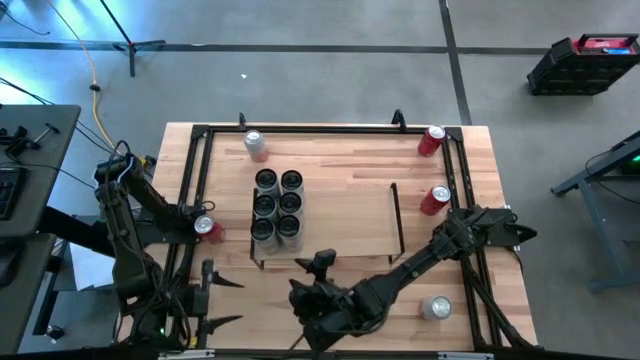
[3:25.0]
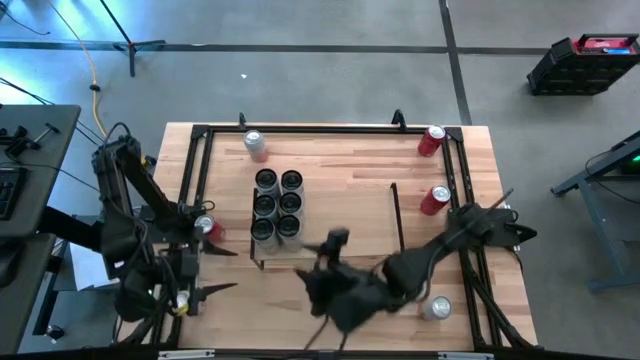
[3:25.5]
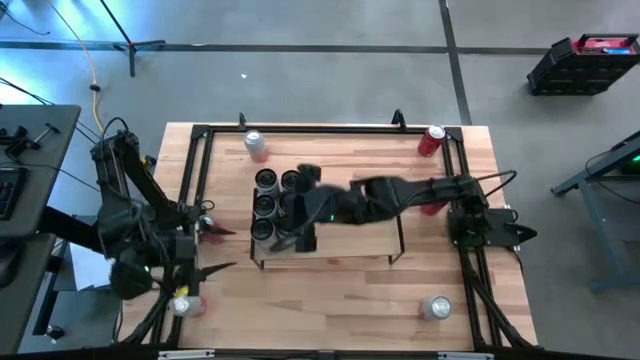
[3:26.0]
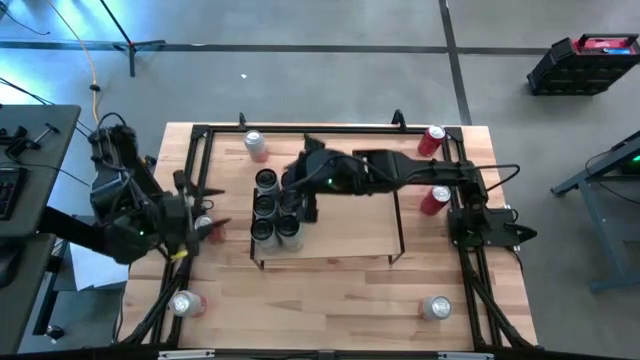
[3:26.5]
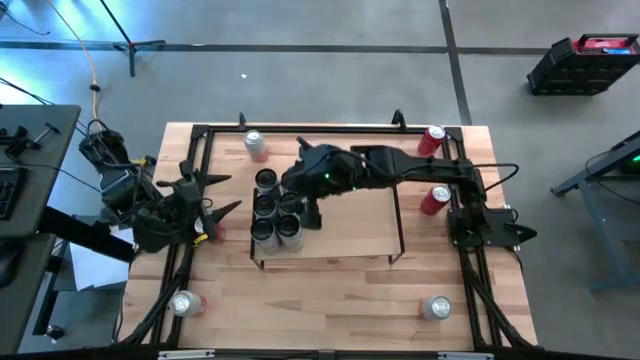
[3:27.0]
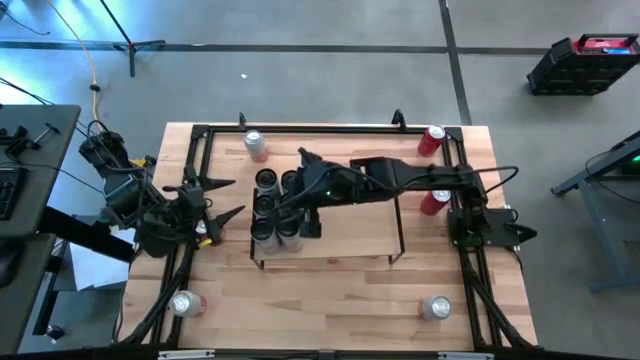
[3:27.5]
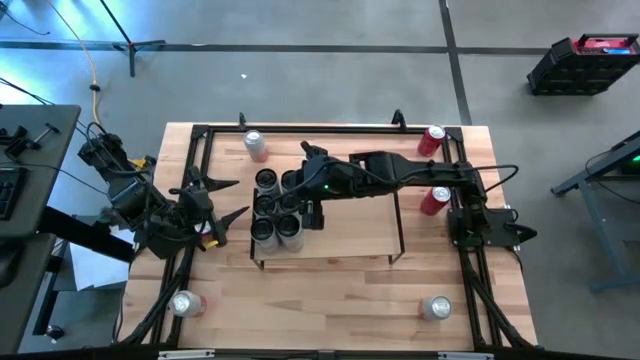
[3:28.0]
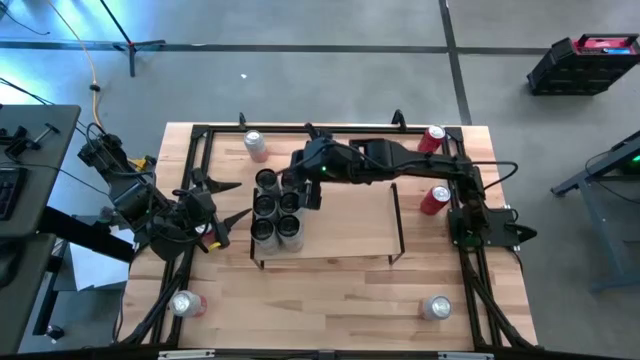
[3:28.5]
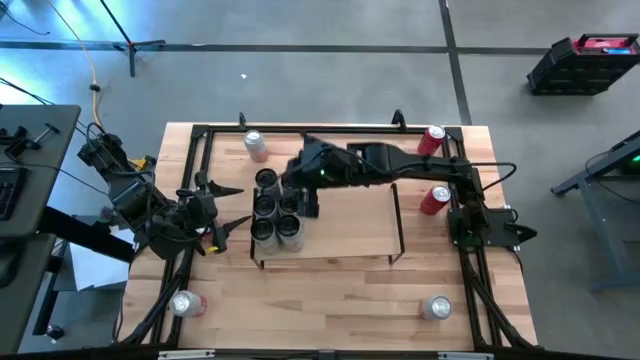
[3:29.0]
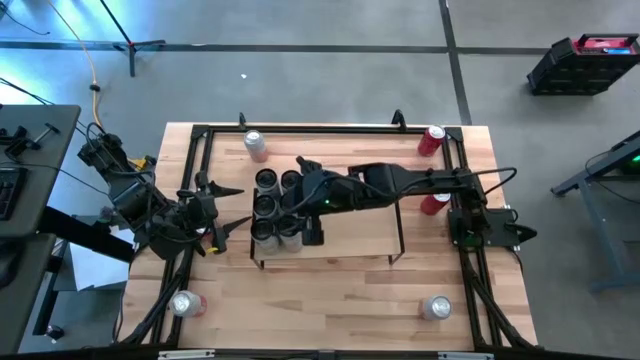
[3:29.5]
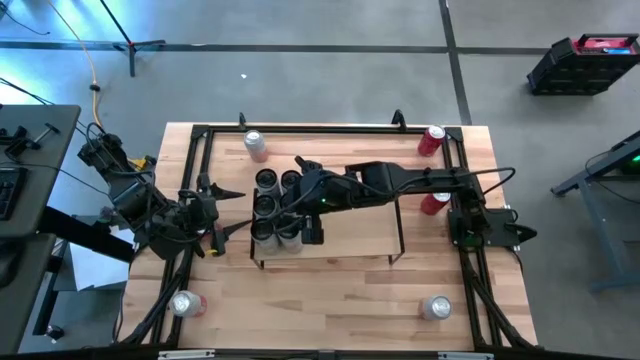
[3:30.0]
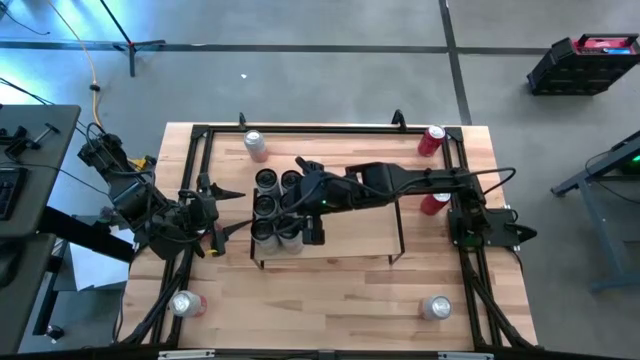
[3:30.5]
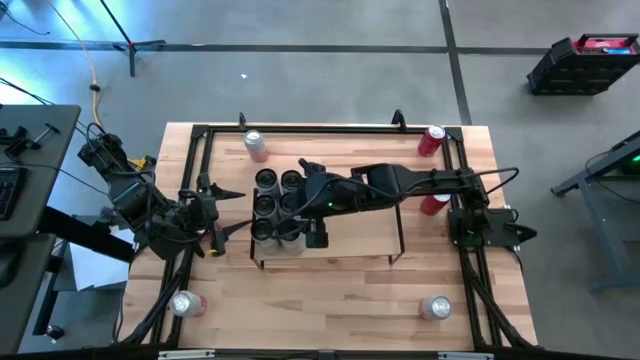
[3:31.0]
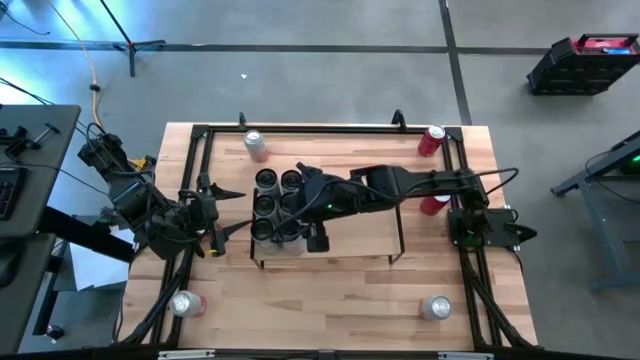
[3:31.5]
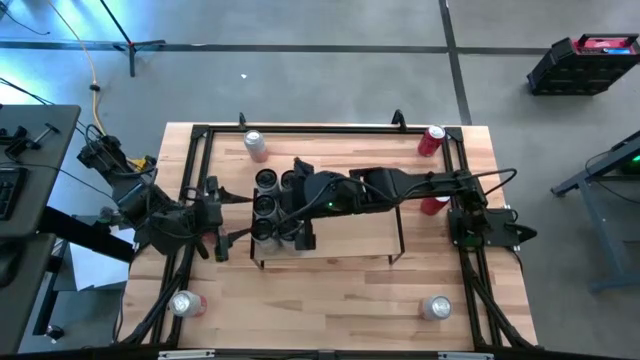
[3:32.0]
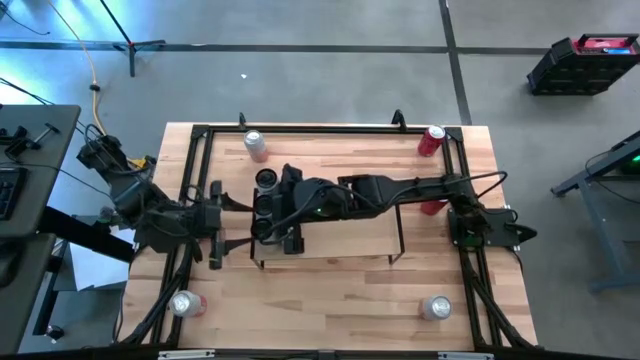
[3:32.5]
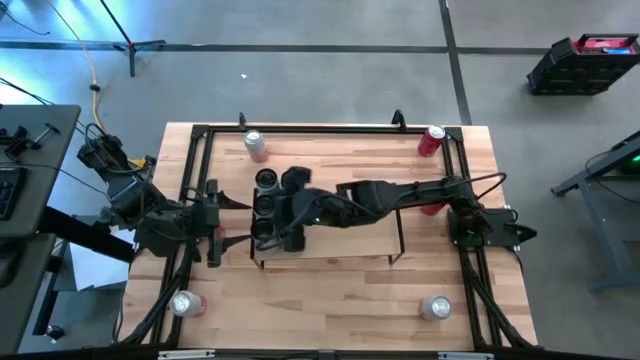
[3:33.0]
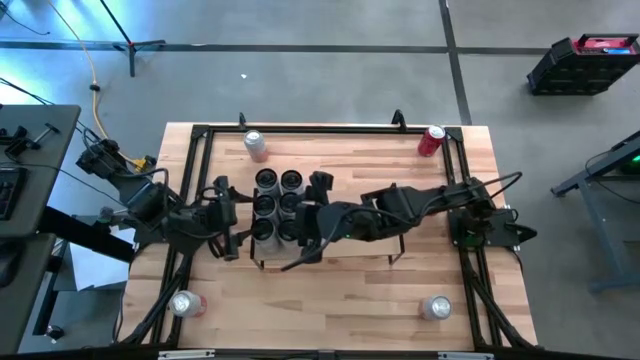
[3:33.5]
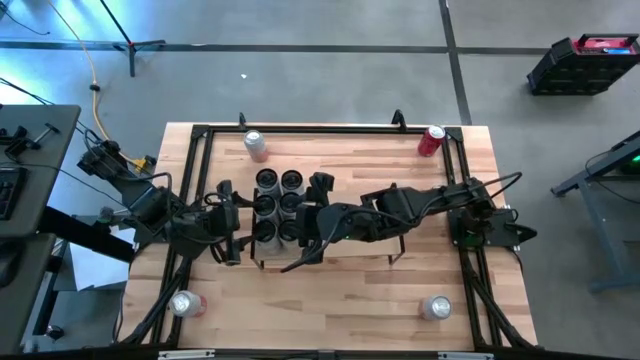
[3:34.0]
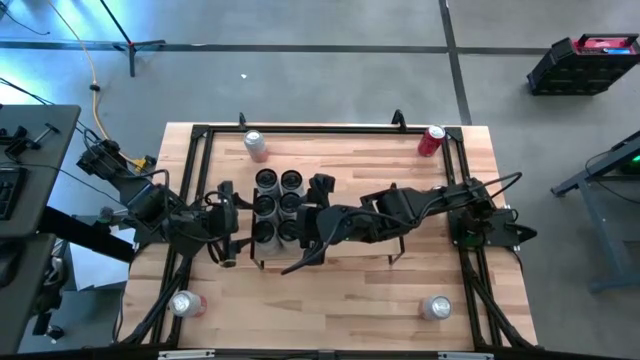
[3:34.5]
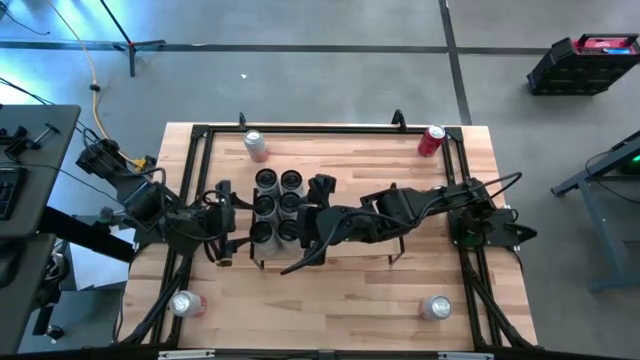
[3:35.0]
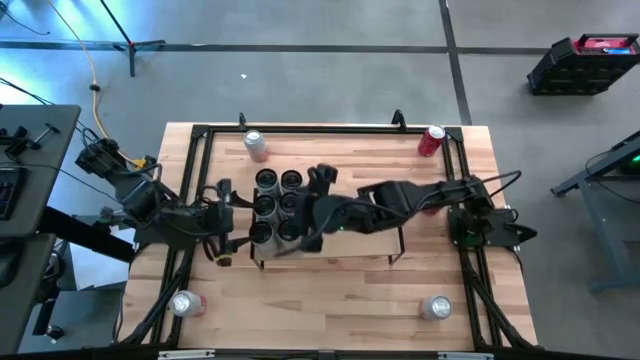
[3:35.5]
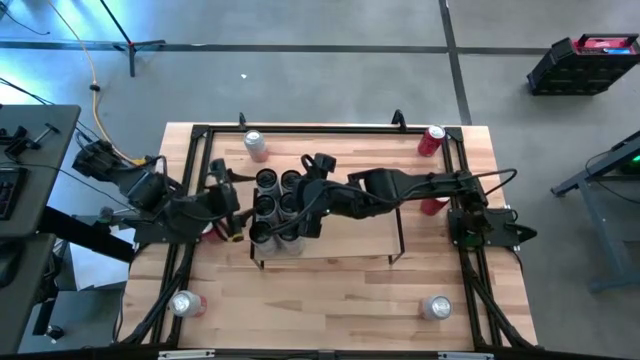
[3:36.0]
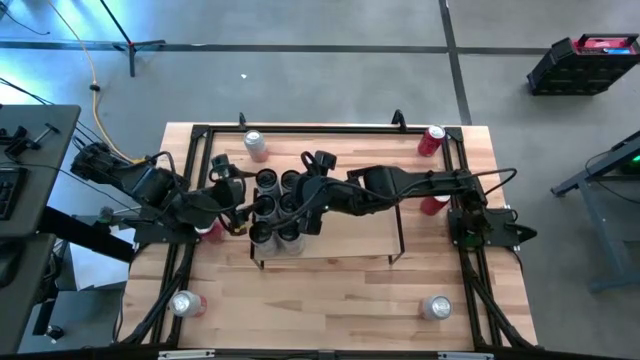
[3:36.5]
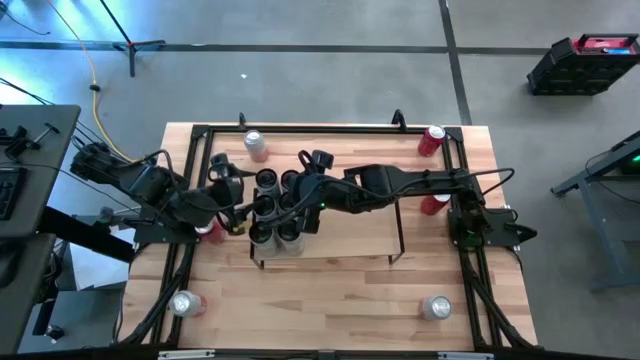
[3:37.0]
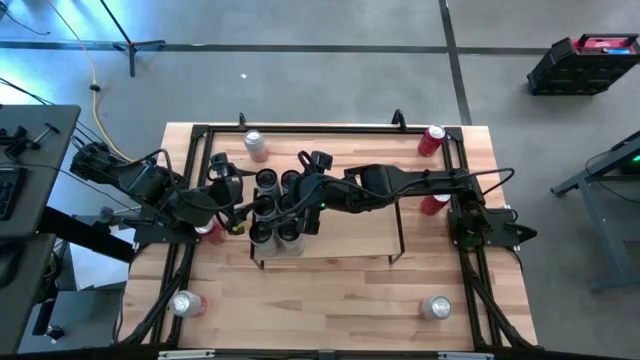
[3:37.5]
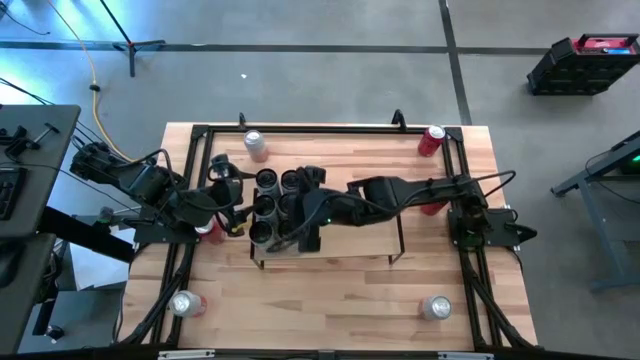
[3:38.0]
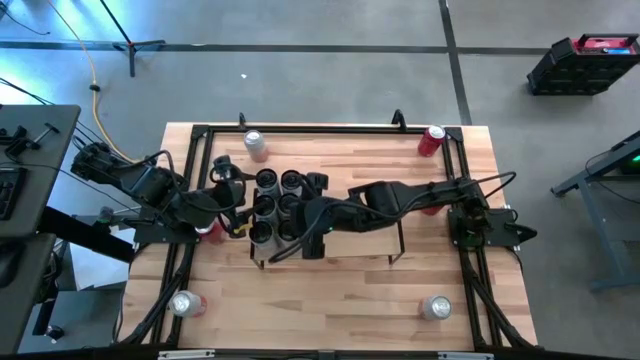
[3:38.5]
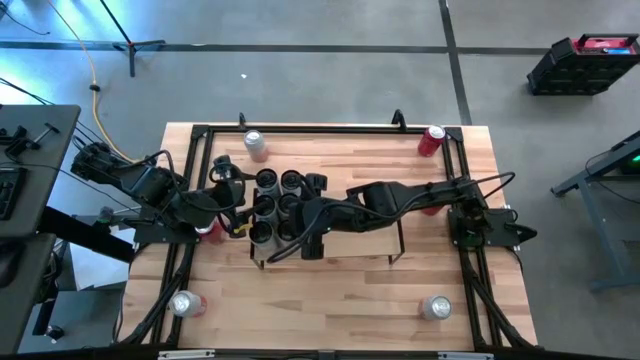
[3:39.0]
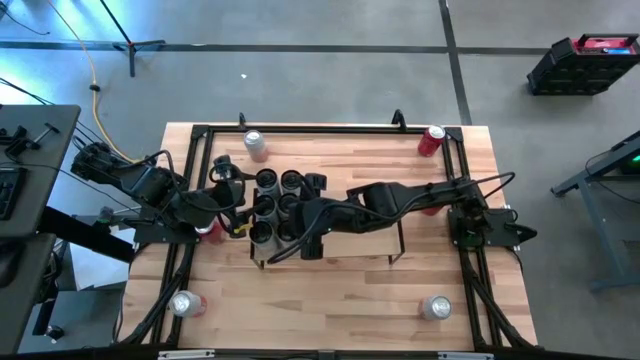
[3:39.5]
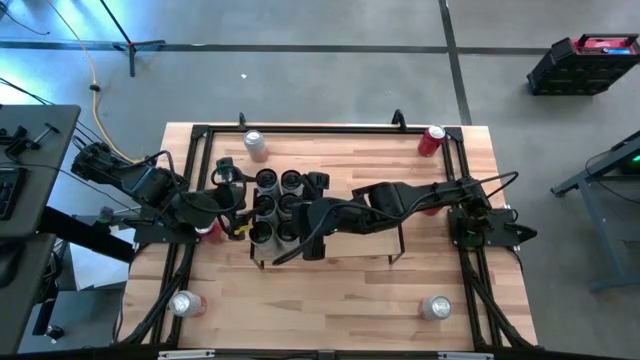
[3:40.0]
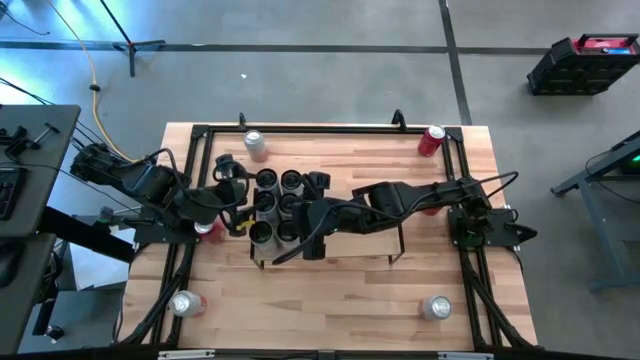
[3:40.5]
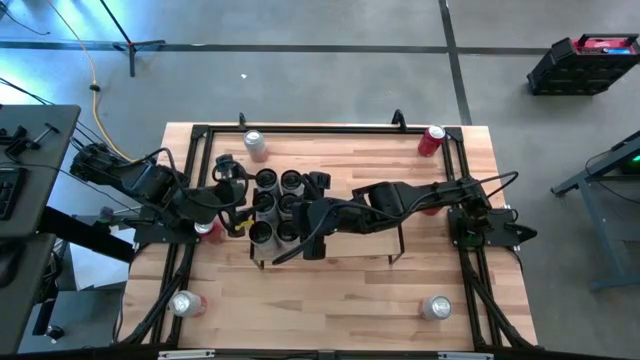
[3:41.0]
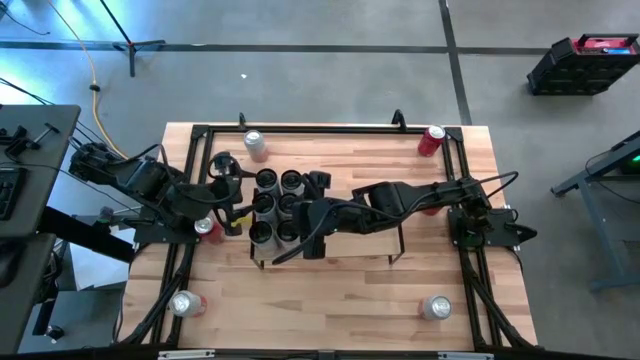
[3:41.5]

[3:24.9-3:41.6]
Task: Place canned beverage on shelf
Adjust the soda cans on the shelf

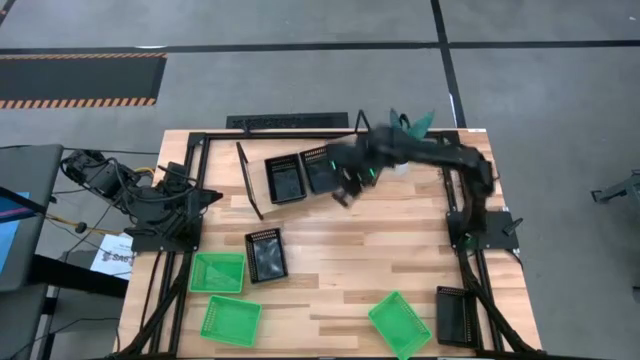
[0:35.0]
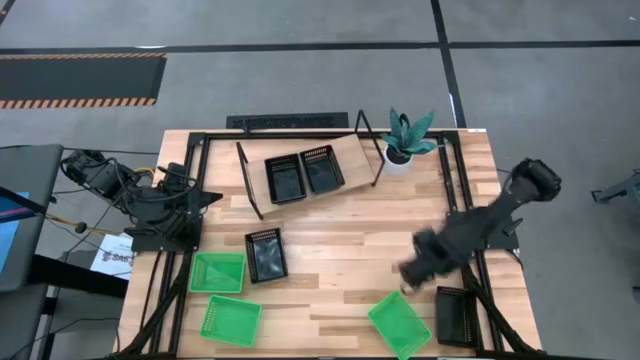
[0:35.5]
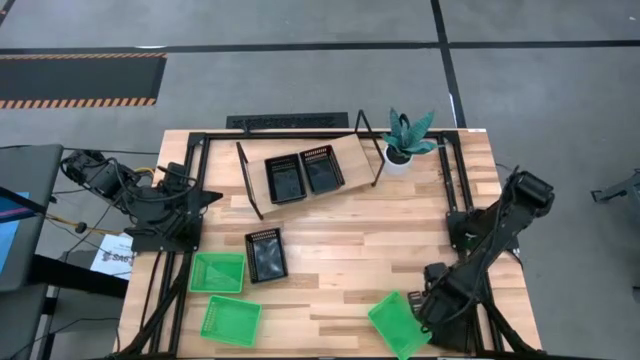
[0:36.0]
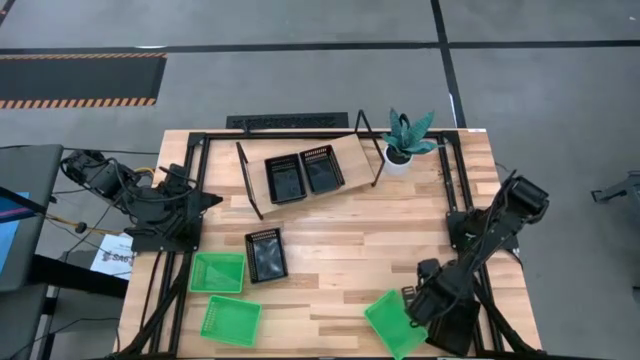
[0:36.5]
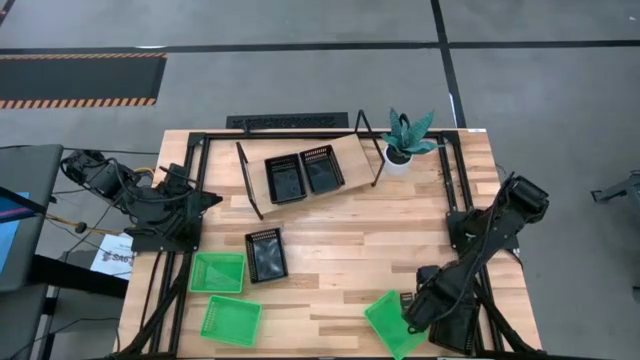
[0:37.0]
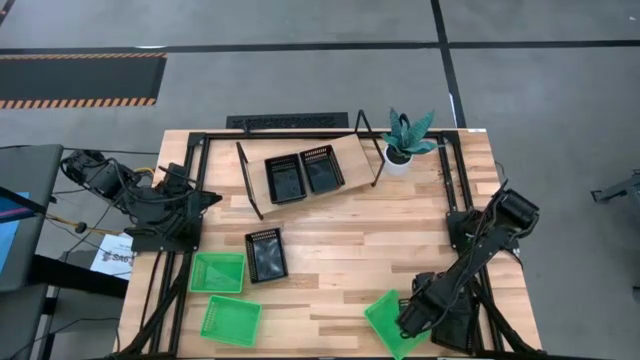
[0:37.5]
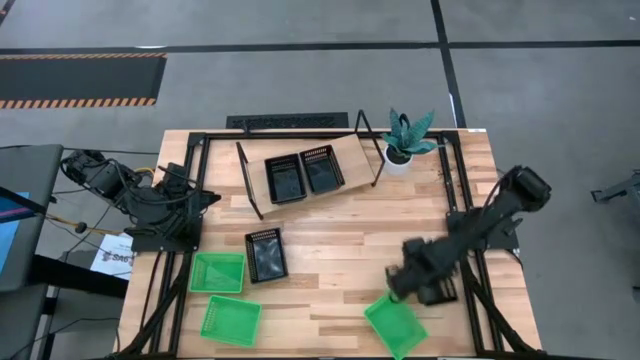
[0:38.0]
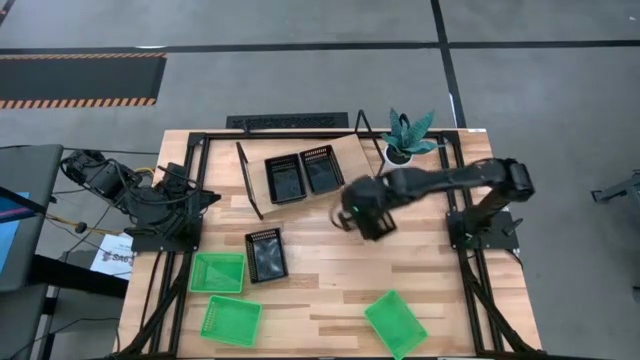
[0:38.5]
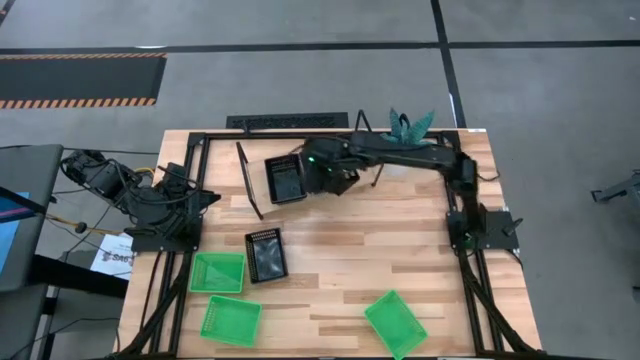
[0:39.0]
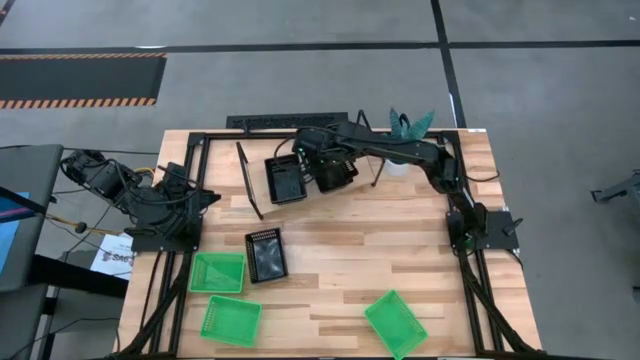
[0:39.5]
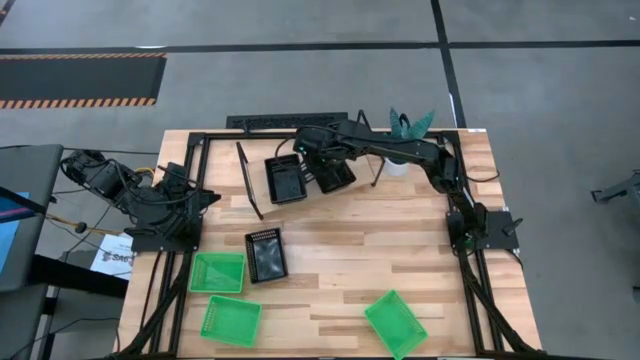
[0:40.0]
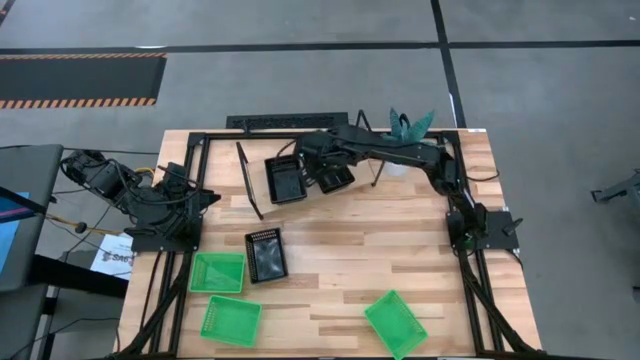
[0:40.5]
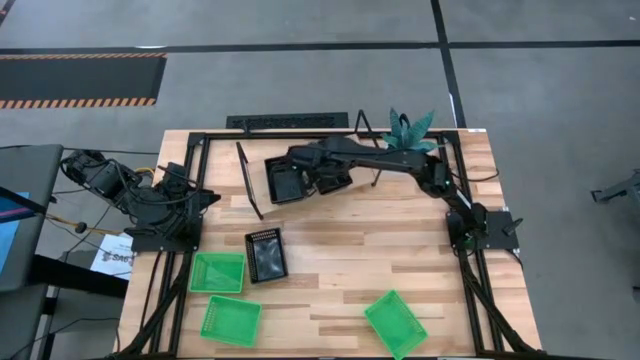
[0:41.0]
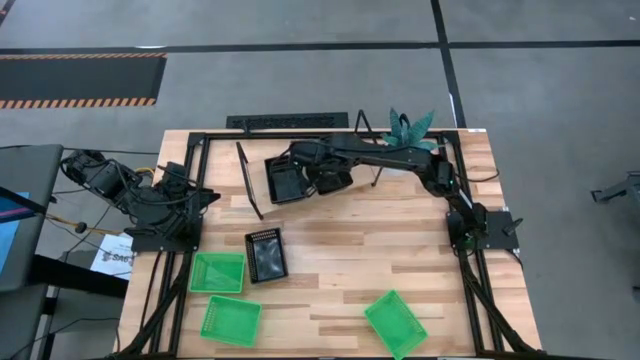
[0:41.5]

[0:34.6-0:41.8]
Task: Stack baskets on shelf by color
Stack the black basket on the right black basket
